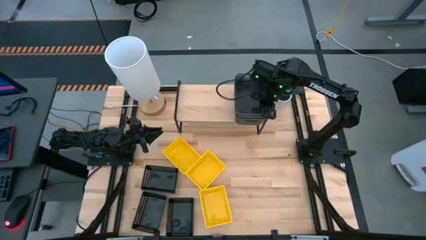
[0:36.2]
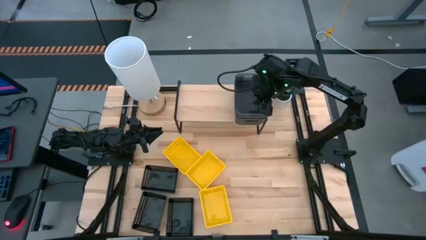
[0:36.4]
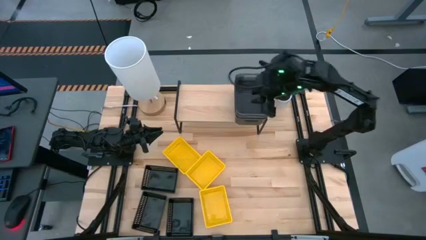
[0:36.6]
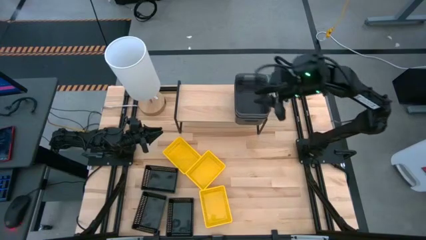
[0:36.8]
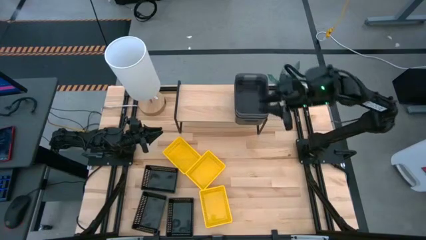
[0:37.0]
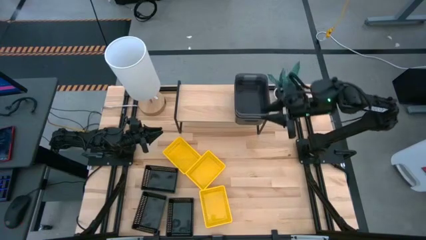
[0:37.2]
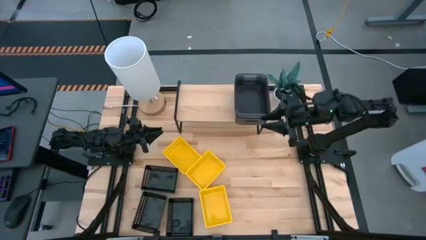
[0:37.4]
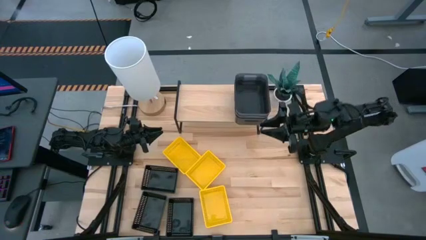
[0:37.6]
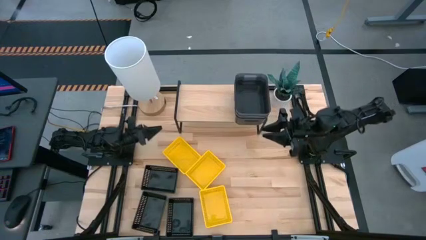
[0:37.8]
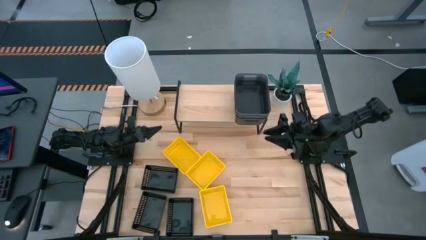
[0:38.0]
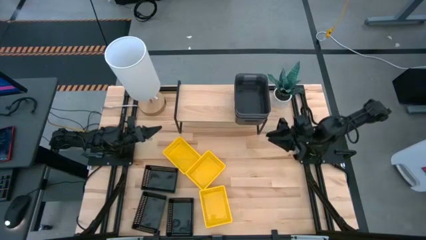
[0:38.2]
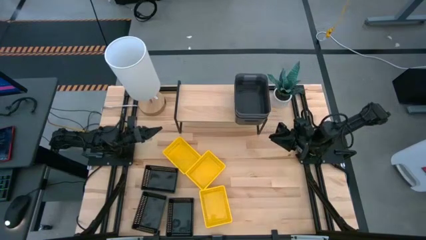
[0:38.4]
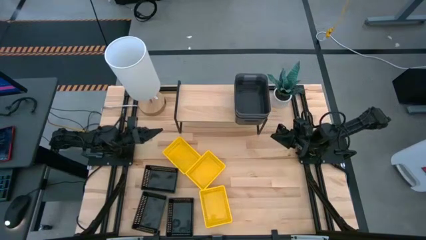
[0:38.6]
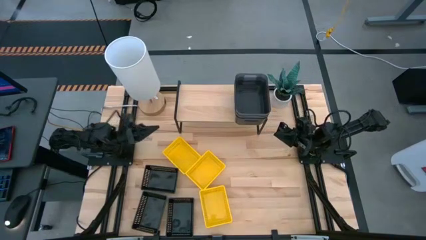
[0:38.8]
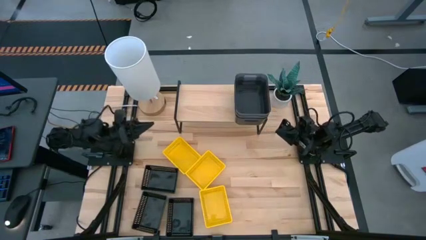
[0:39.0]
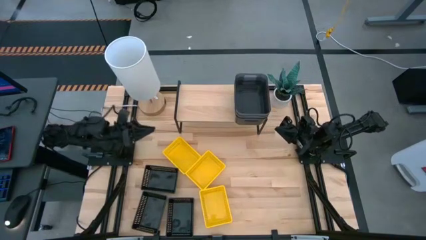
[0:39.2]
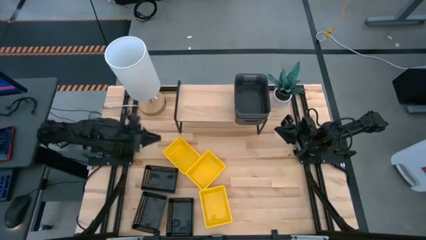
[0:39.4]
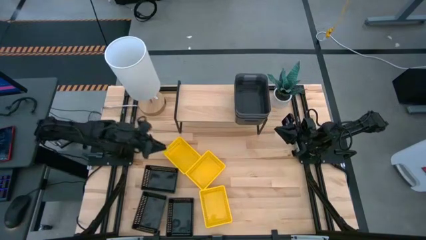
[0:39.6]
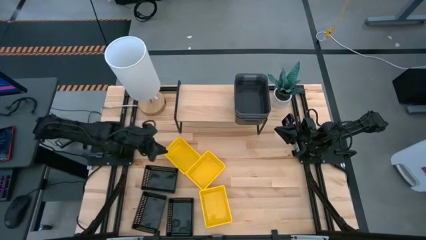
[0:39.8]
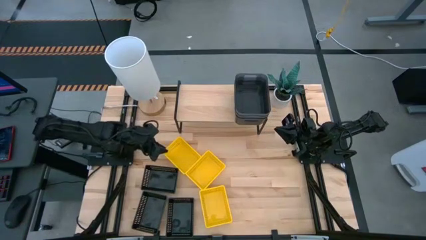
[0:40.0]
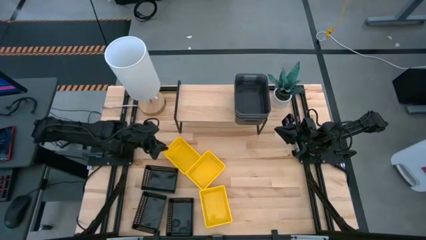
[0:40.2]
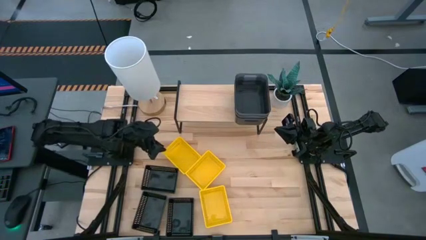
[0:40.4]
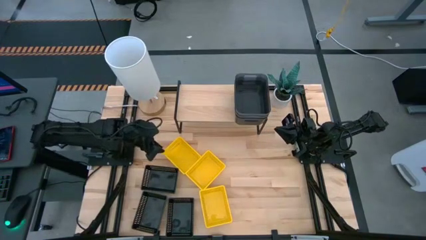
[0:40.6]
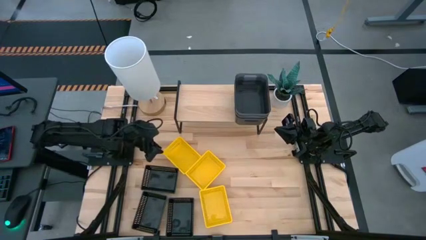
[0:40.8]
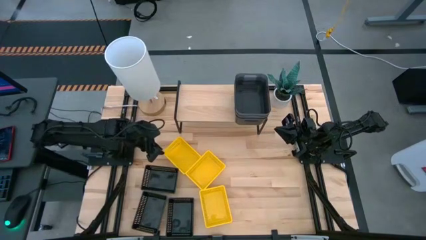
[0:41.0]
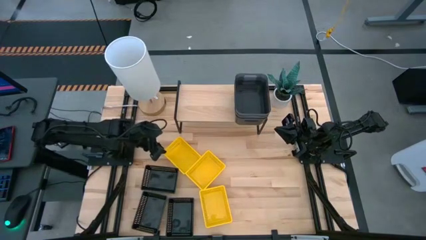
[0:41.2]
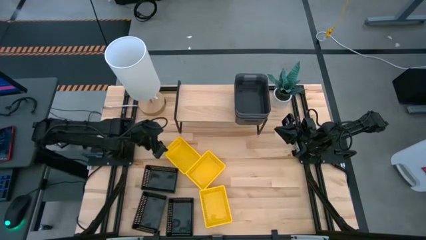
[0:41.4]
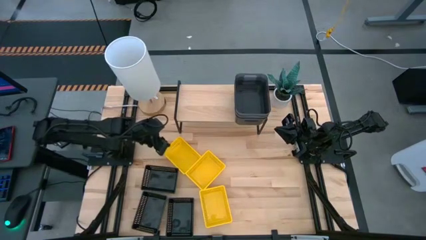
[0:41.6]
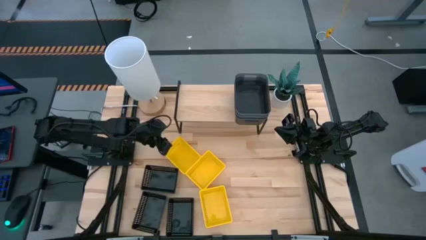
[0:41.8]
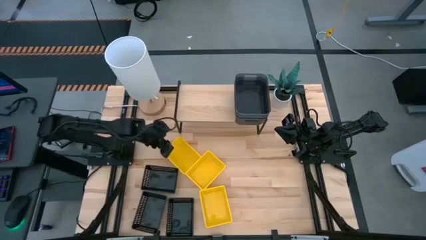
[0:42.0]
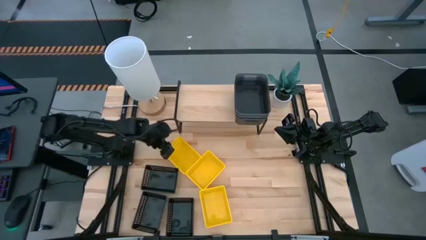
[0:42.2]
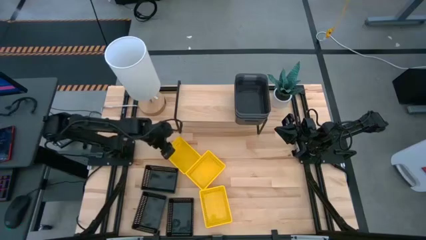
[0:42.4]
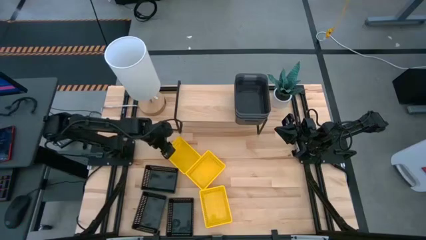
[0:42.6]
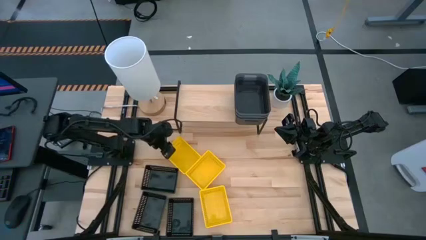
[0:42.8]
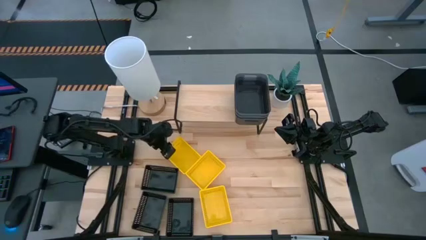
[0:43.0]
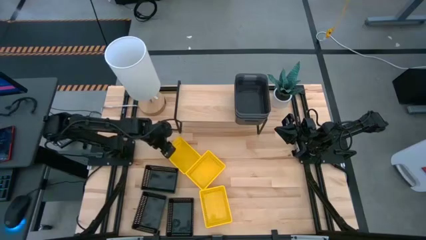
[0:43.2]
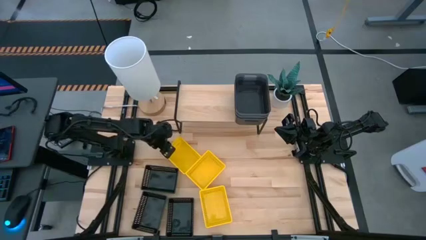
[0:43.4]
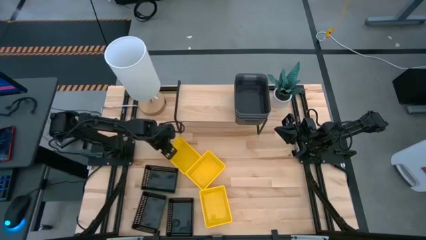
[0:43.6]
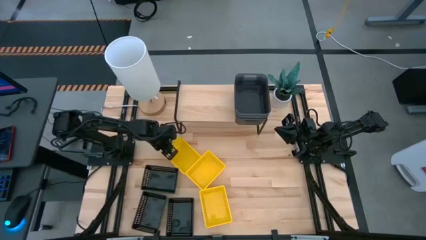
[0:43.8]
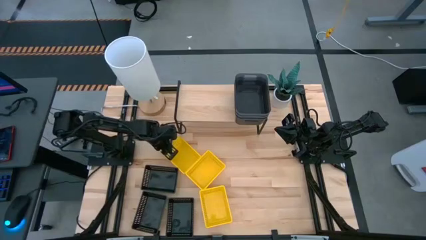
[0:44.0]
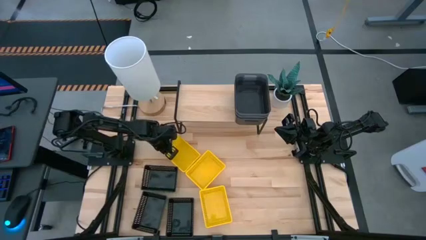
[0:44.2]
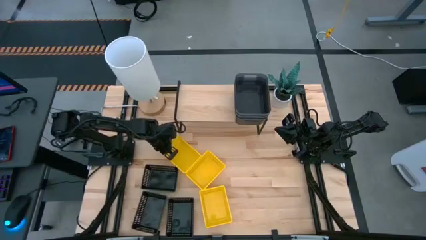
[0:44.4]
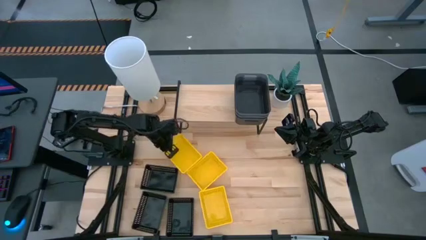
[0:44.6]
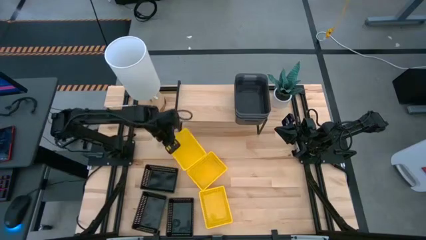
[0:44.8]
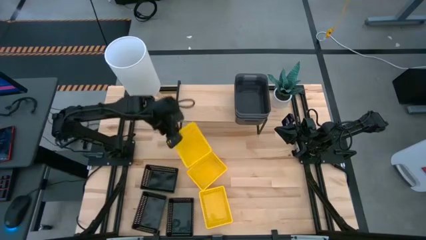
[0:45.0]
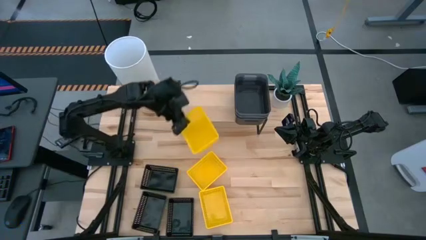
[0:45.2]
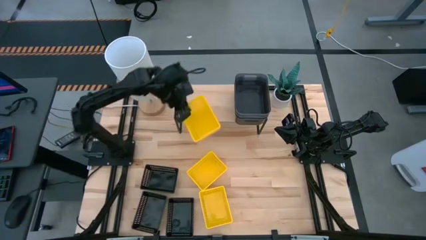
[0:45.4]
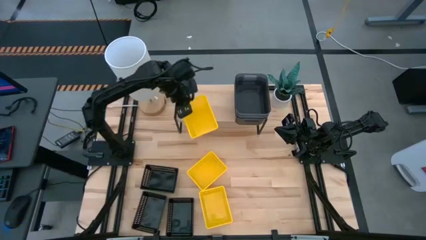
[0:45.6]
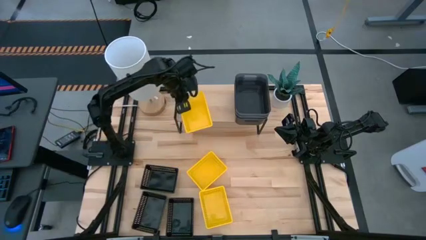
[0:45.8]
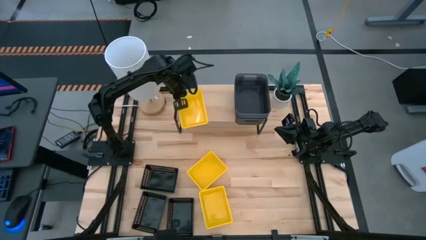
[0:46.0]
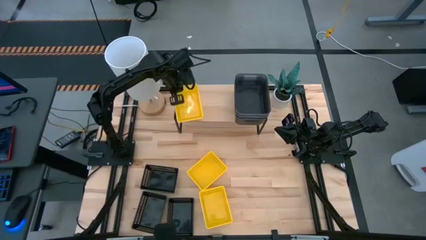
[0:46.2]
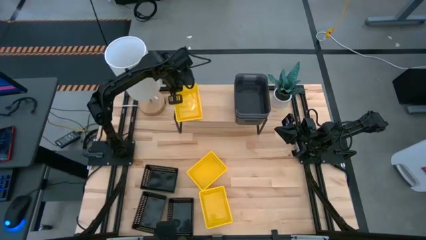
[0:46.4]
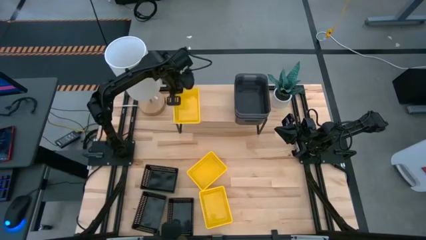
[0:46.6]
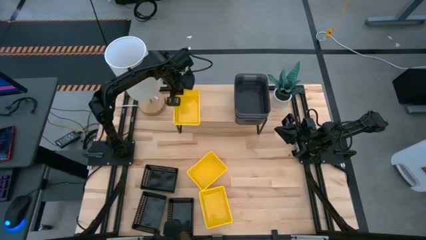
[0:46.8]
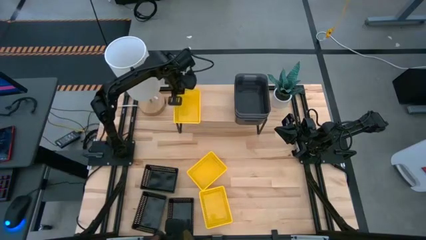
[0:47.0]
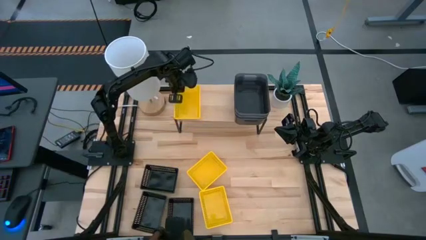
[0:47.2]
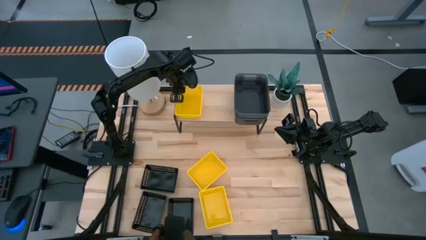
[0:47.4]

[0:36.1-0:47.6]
Task: Stack baskets on shelf by color
Put the top yellow bin on the shelf

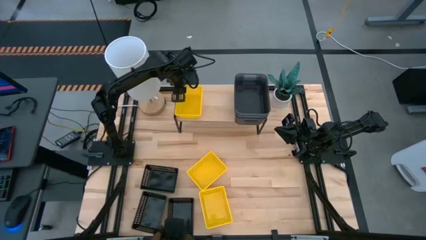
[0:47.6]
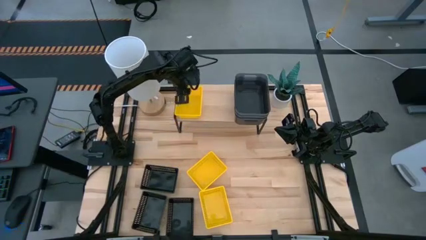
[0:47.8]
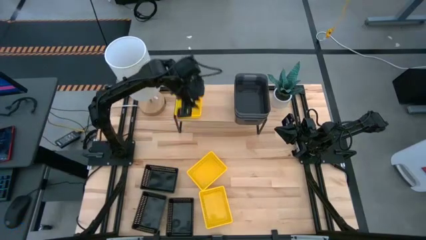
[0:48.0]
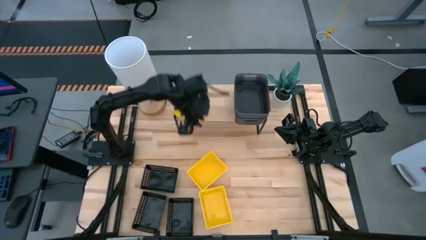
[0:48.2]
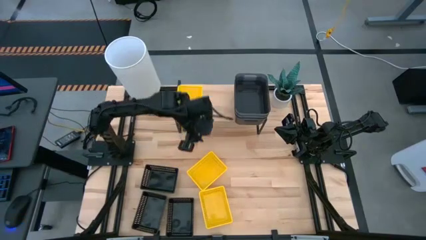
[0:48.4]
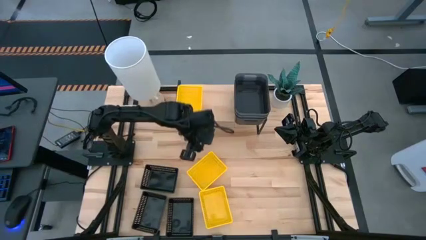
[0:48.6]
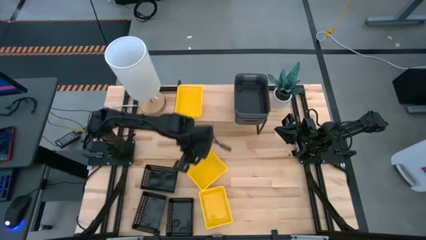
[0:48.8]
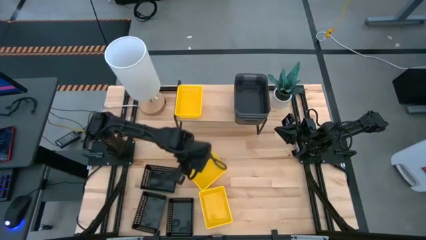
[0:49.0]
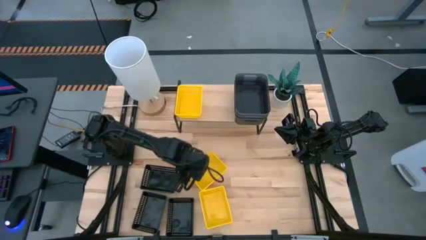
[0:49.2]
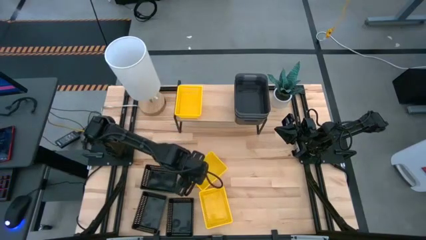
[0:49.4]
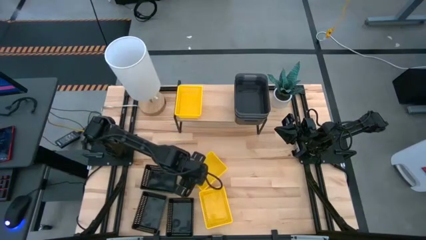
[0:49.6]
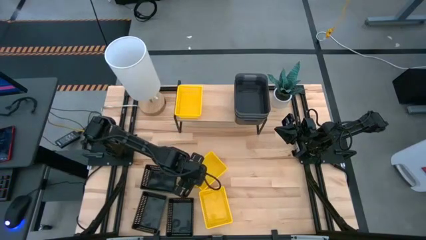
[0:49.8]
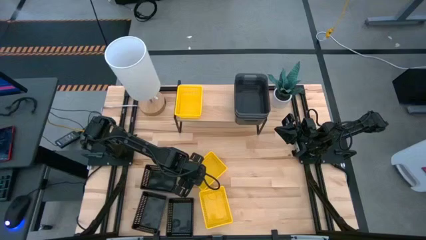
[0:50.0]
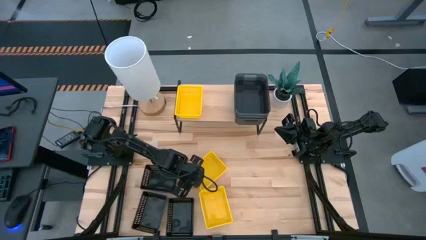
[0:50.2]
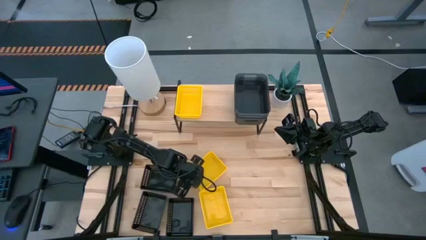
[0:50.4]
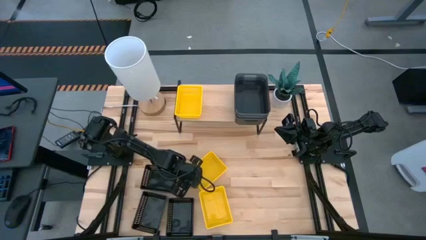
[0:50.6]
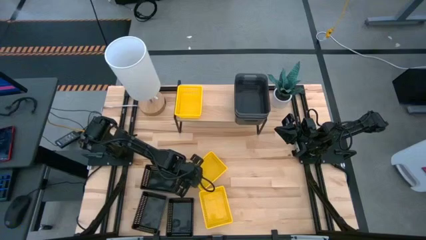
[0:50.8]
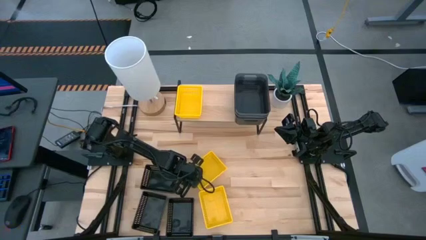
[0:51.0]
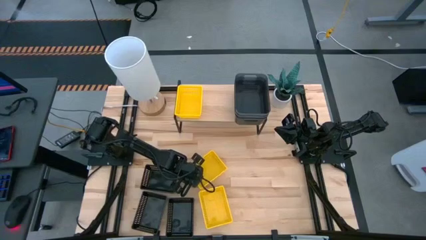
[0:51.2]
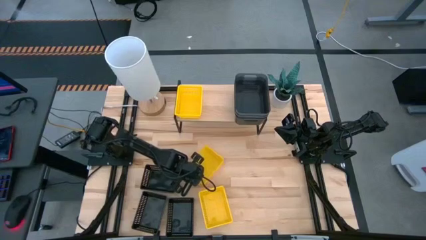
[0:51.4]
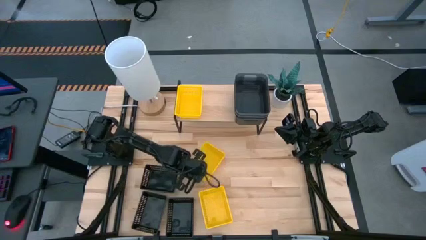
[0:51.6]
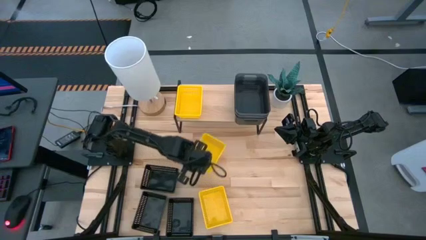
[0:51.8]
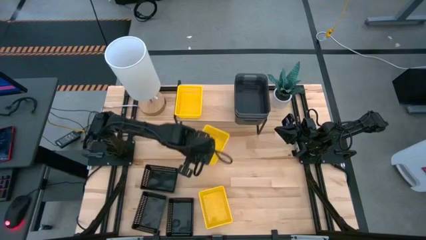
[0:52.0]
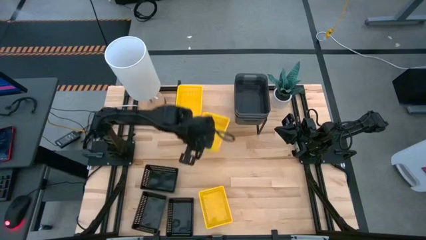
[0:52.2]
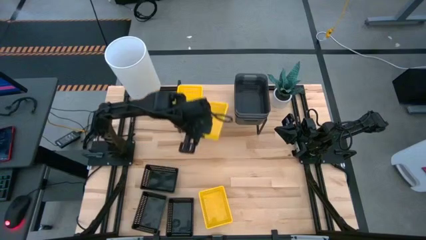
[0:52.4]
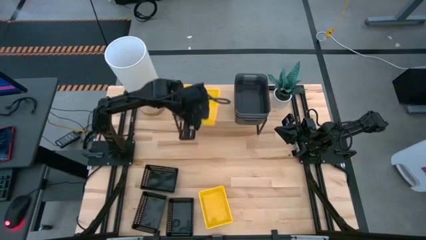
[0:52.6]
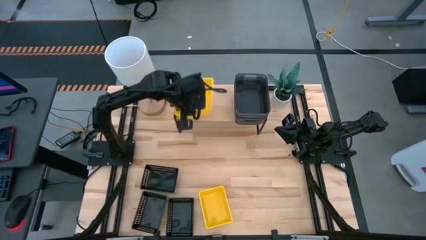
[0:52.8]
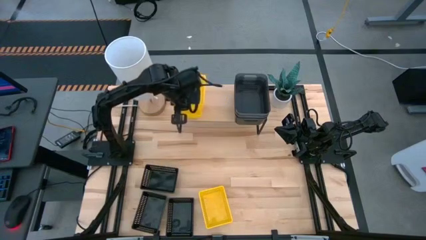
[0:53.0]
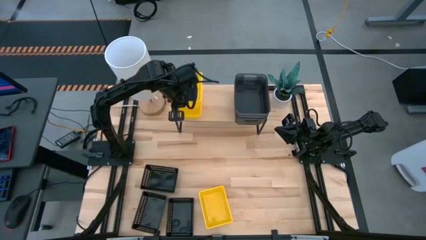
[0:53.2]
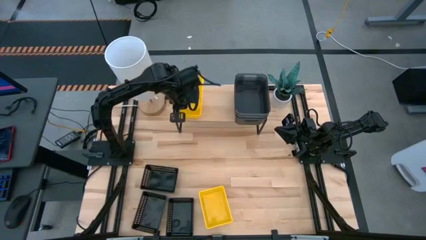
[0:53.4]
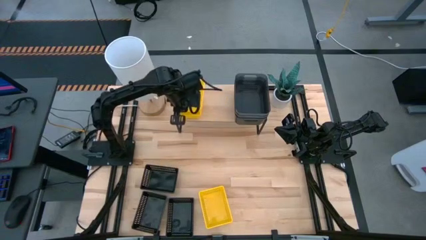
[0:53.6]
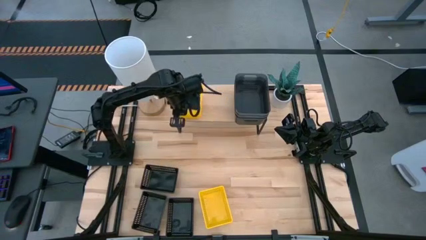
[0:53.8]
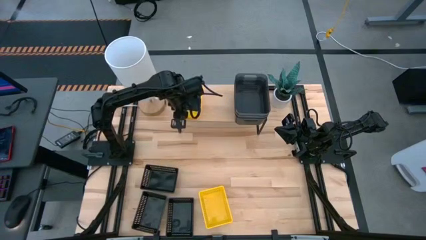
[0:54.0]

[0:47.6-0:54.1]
Stack the top yellow bin on top of the yellow bin on the shelf
